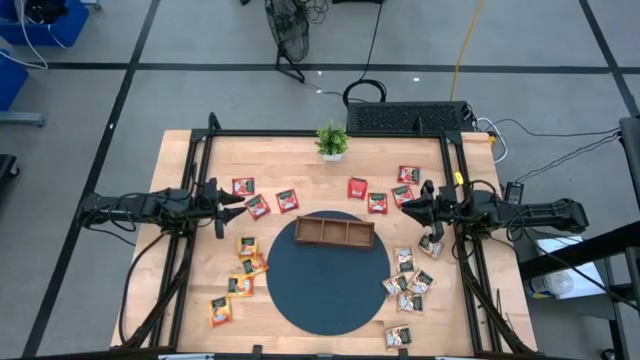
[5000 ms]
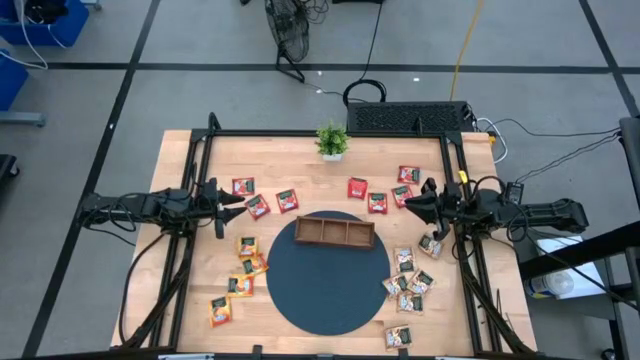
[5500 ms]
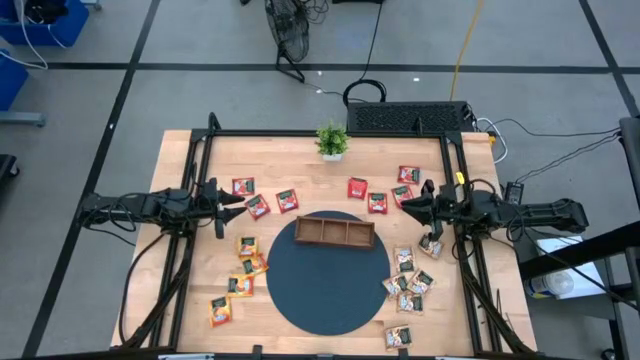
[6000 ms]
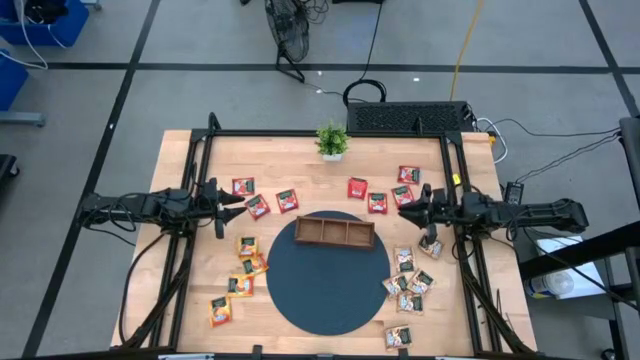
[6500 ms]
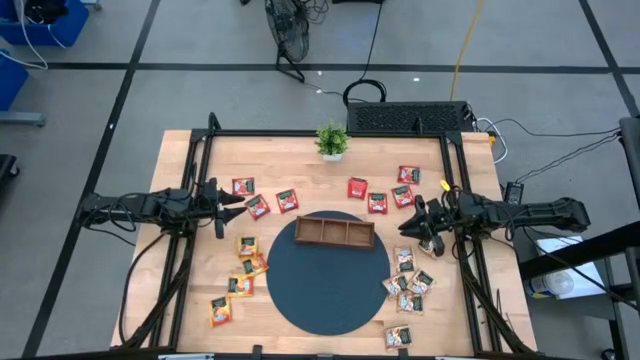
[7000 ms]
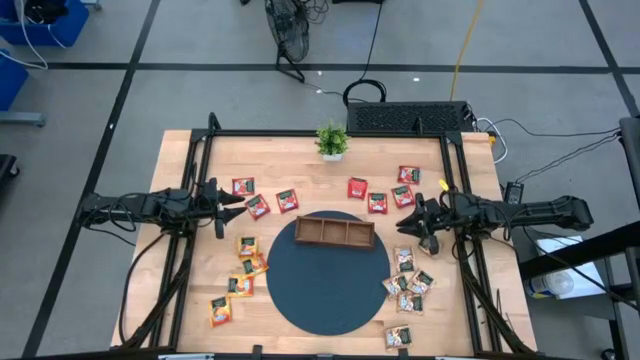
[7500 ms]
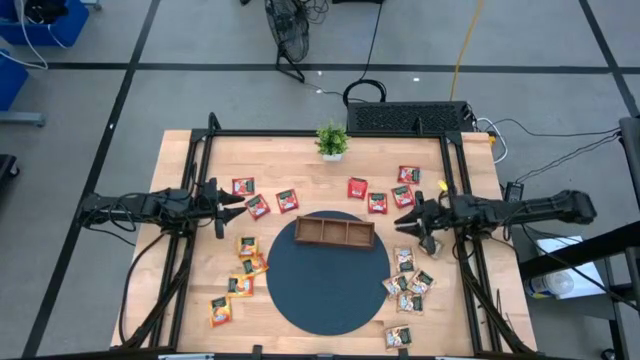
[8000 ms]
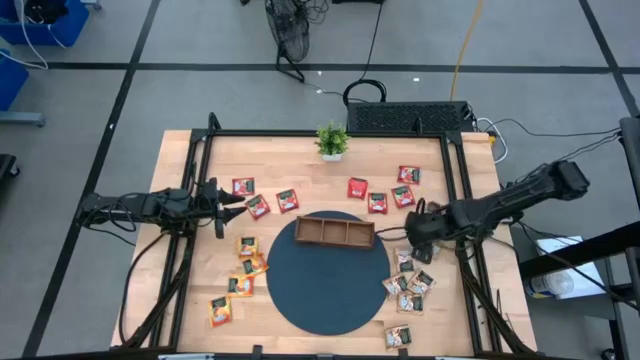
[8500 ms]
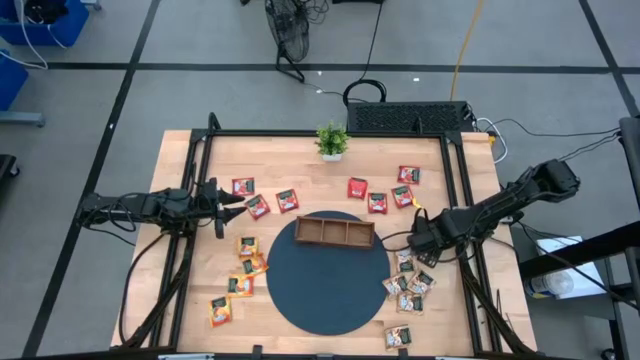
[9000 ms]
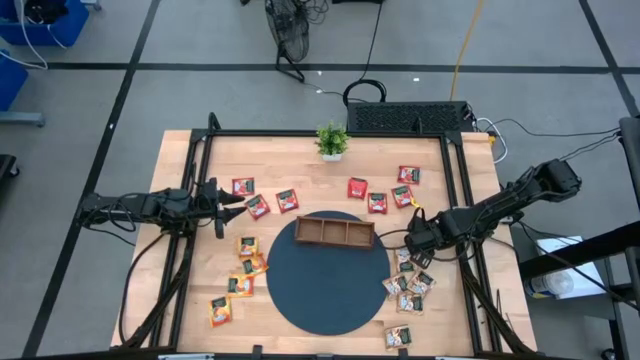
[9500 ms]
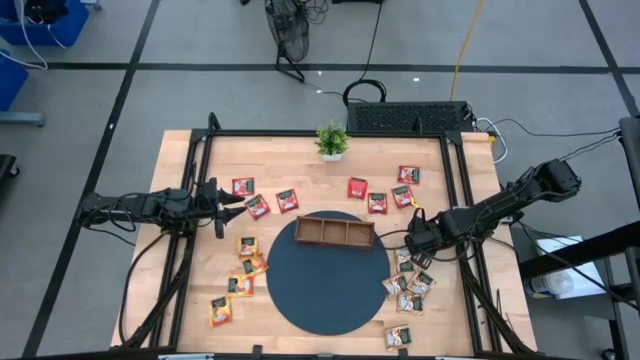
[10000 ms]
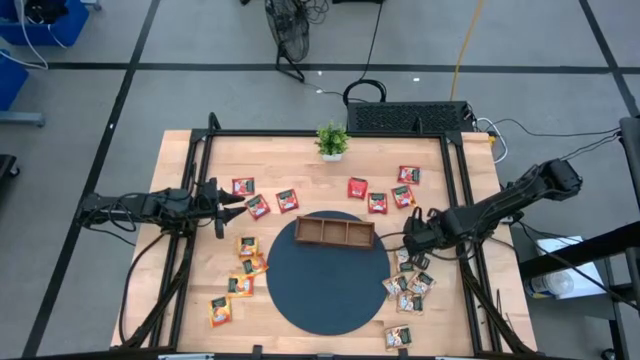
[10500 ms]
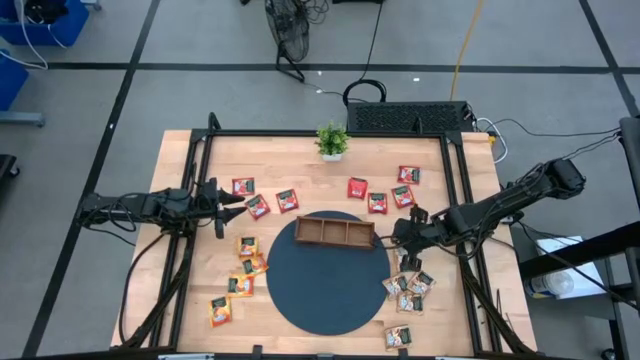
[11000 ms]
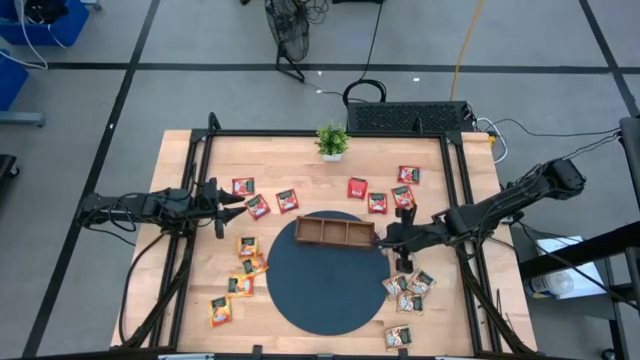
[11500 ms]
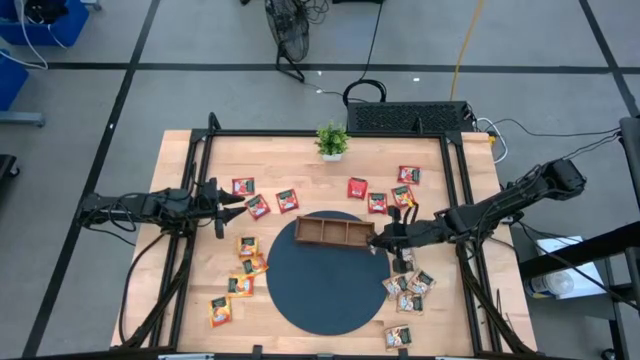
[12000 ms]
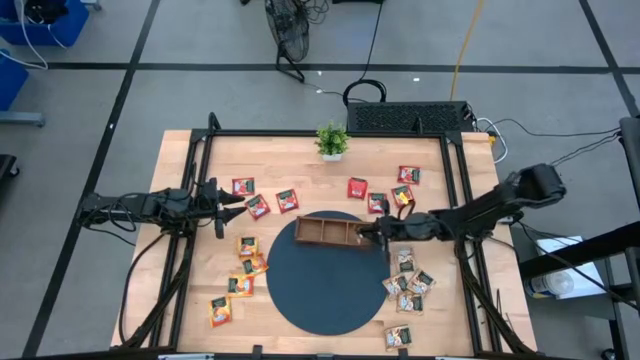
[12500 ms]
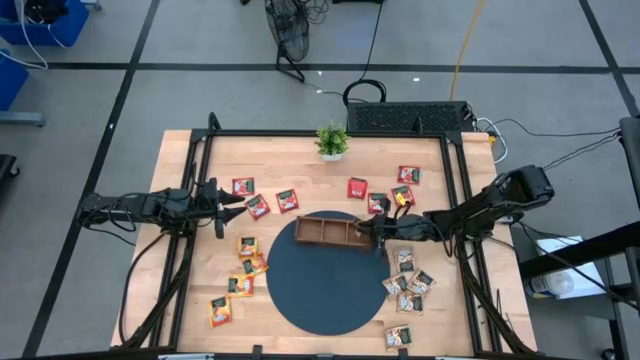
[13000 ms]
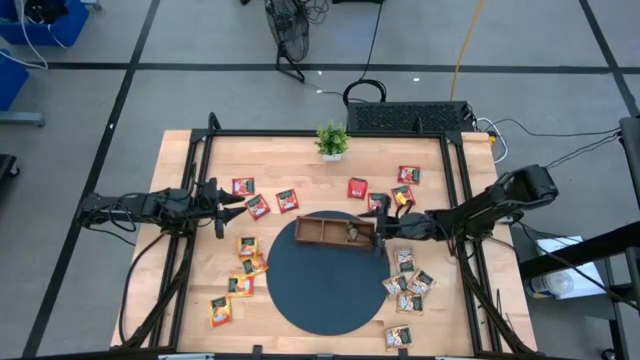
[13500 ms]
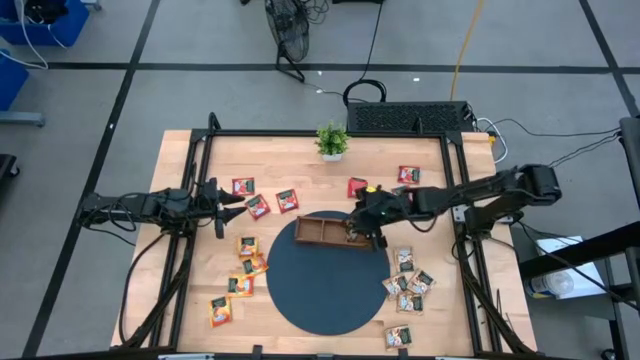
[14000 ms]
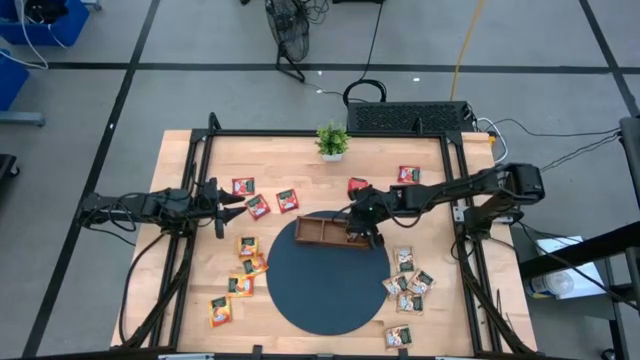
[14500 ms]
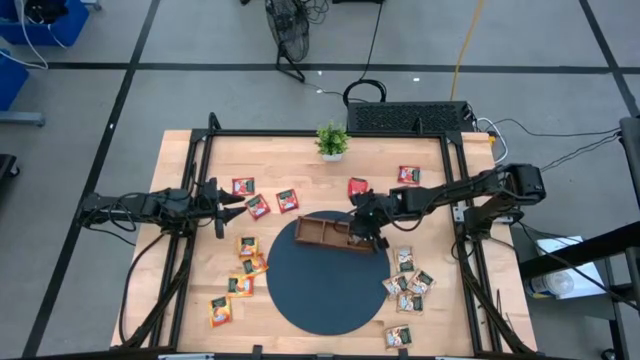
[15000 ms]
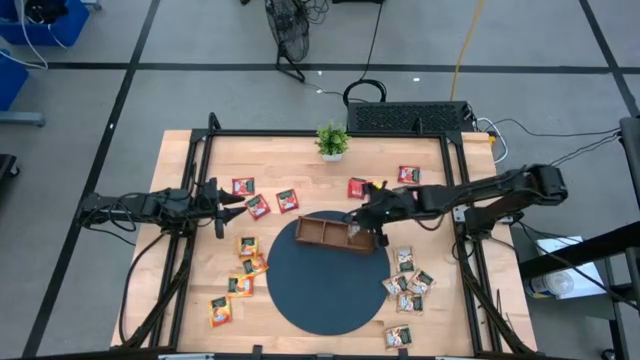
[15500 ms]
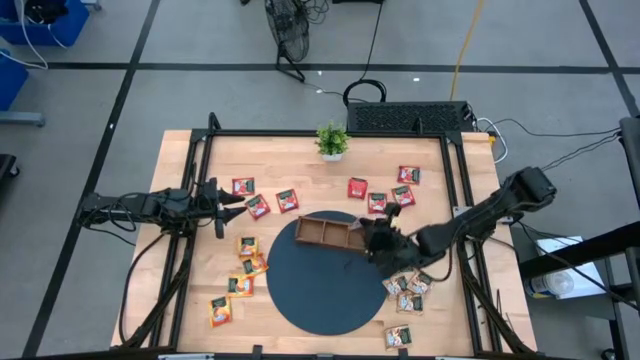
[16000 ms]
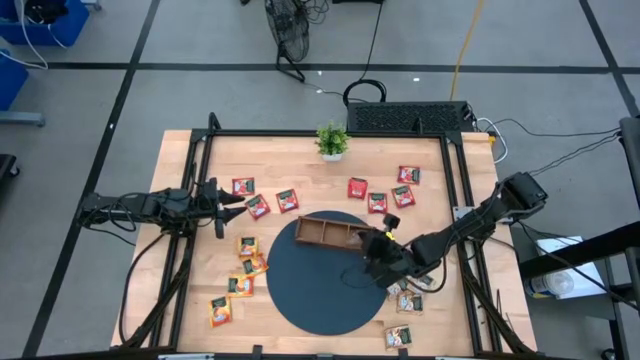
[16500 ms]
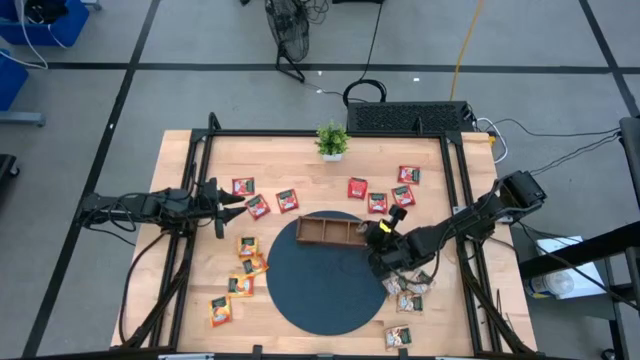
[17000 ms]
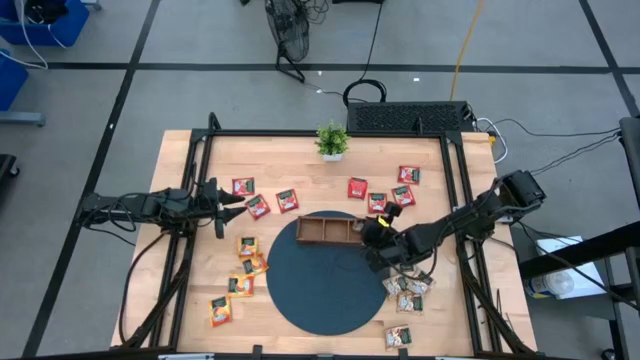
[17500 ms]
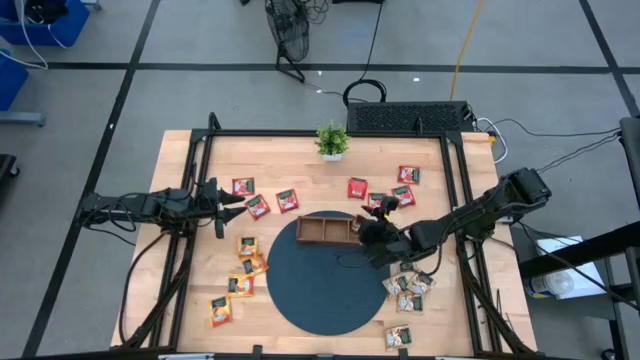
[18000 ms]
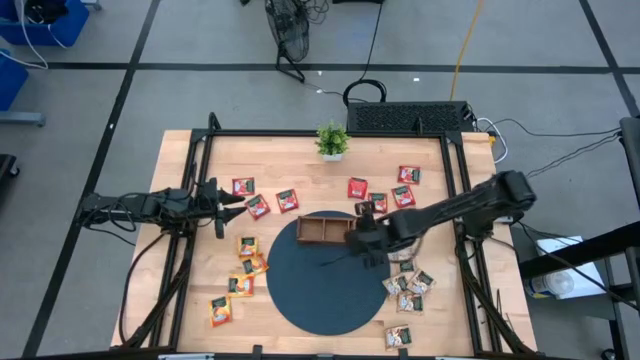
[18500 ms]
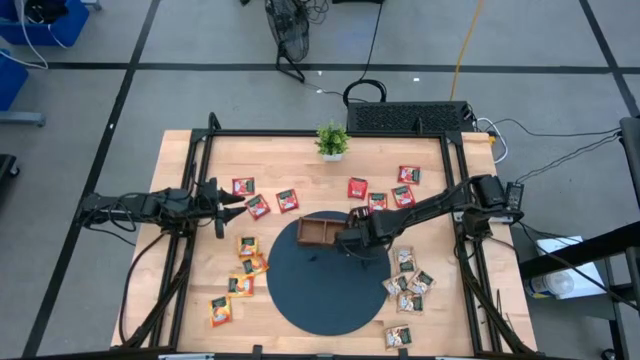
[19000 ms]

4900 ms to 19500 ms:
Task: Pick & Place Tea
Put the brown tea bag into the right slot of the wooden organizer

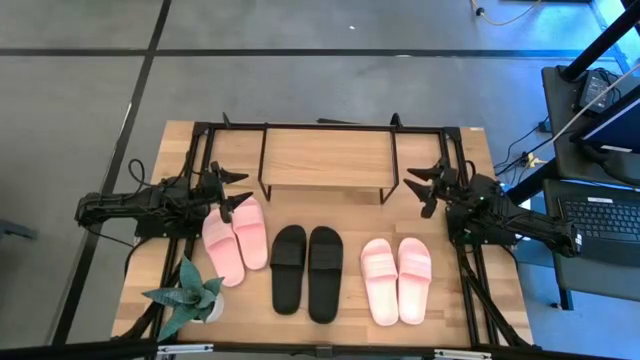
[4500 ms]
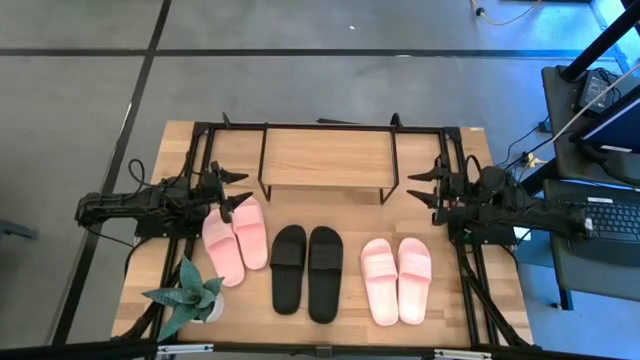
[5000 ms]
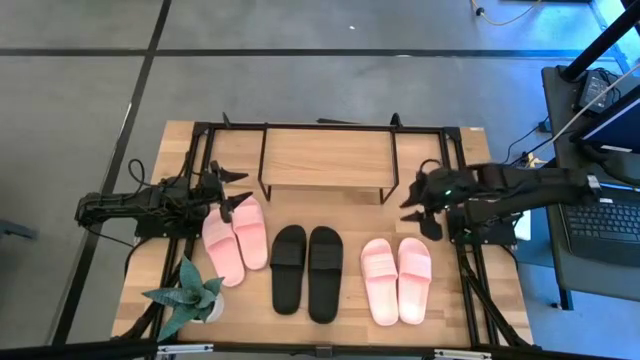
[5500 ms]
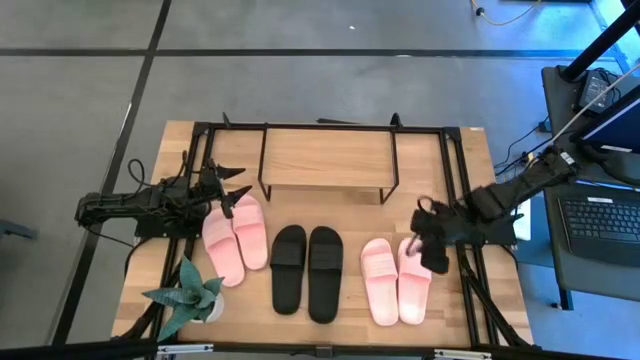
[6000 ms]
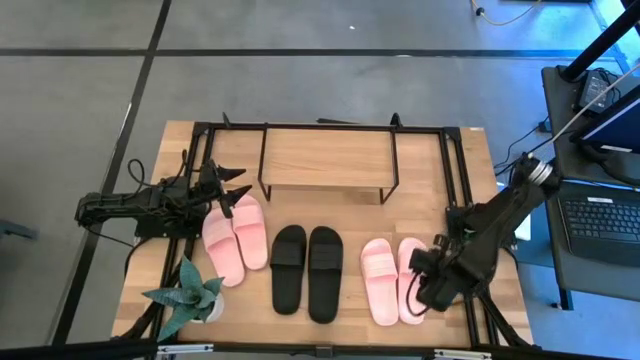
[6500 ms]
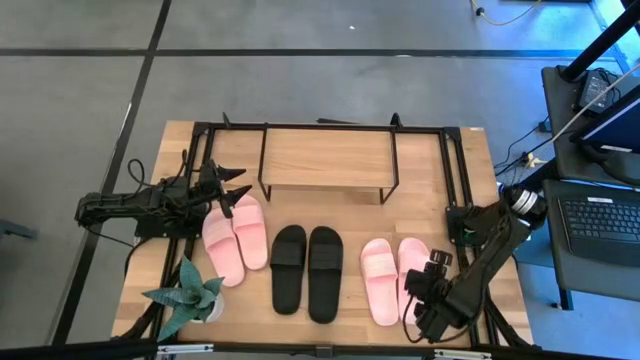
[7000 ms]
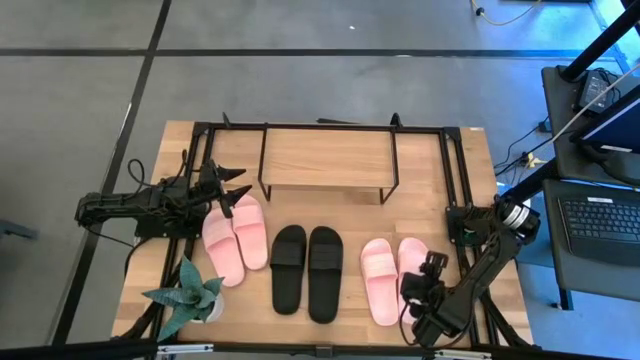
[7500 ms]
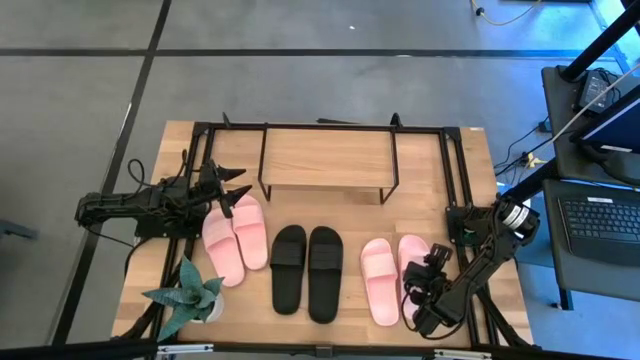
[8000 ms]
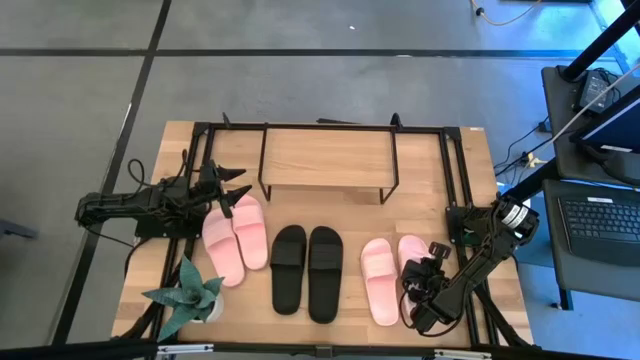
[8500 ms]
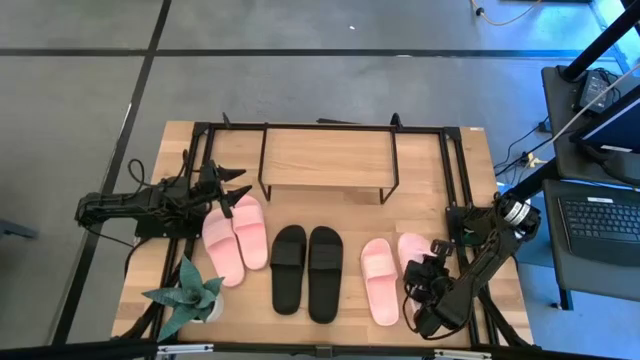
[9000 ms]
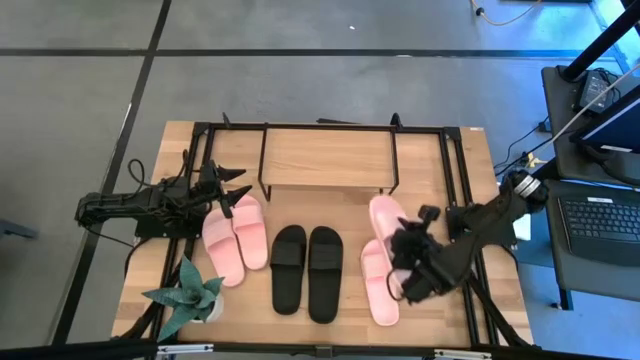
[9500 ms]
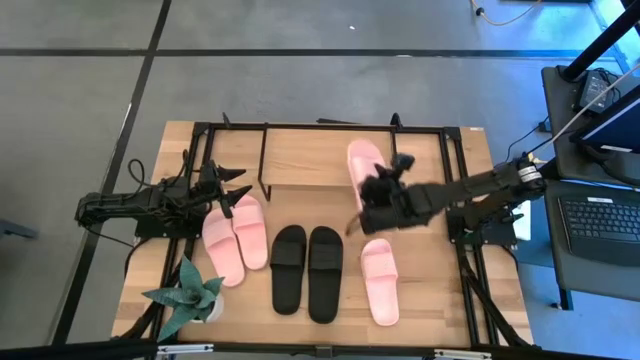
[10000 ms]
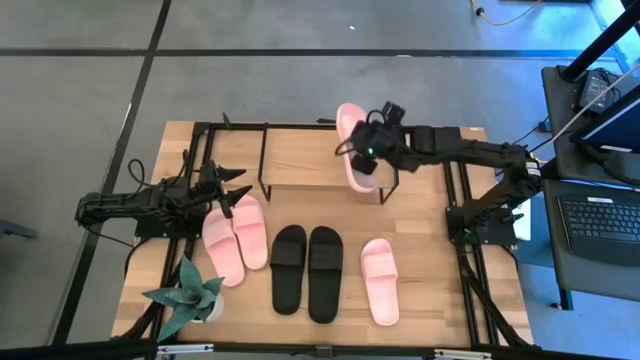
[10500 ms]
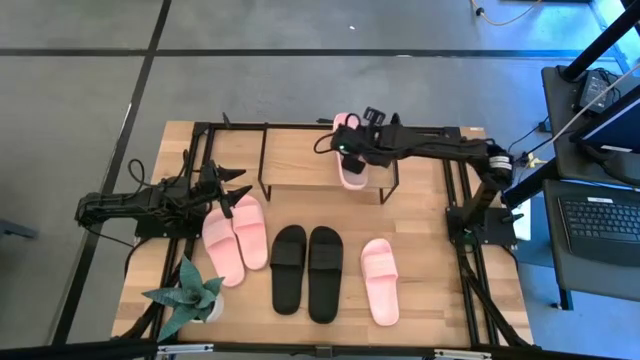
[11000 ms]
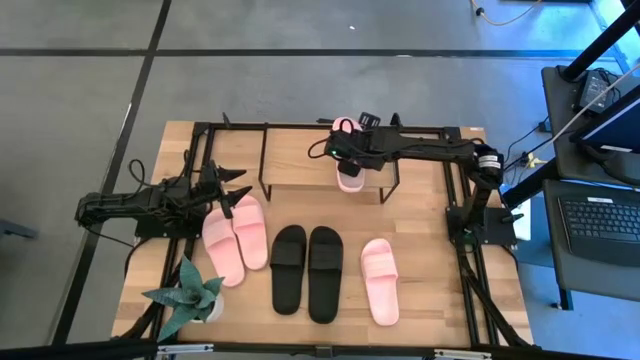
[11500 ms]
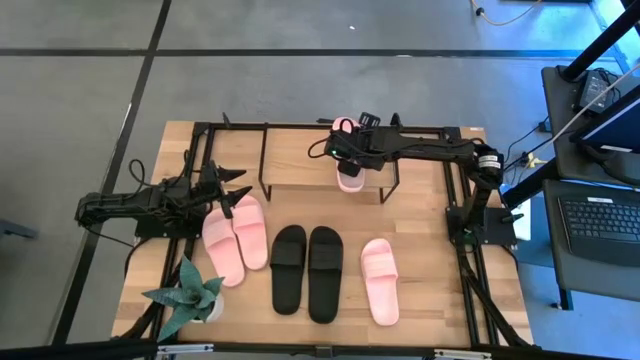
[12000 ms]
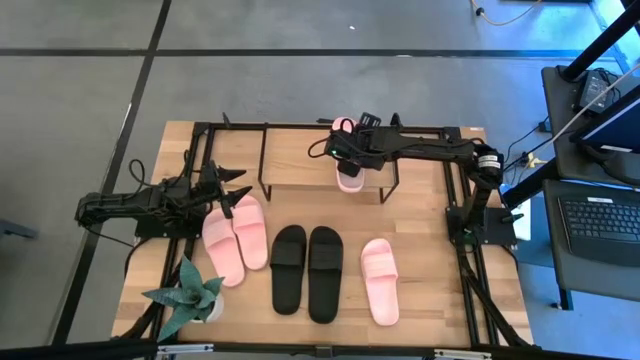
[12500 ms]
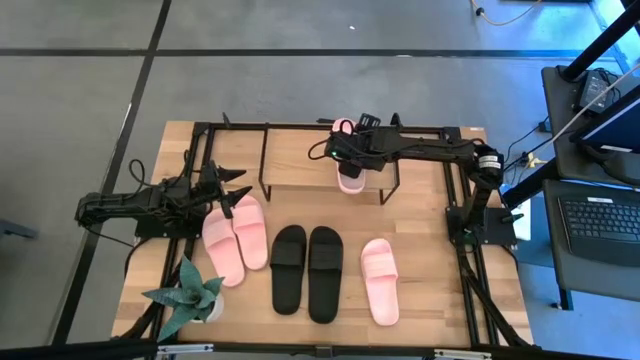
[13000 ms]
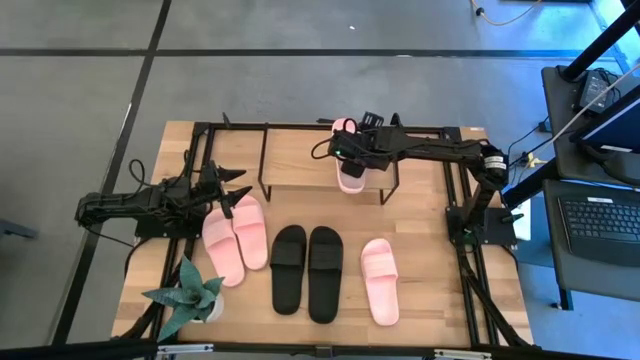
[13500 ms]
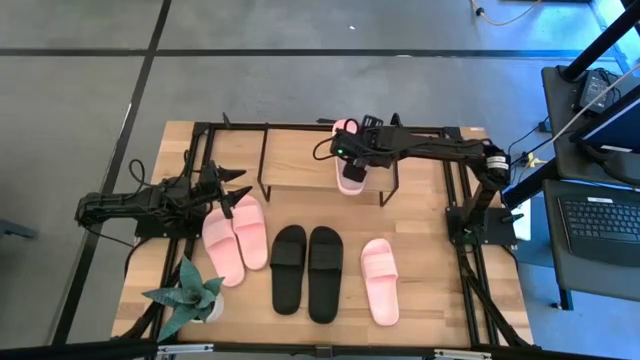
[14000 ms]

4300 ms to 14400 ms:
Task: Pick and place slides into the shelf
Put the pink slide on the shelf
